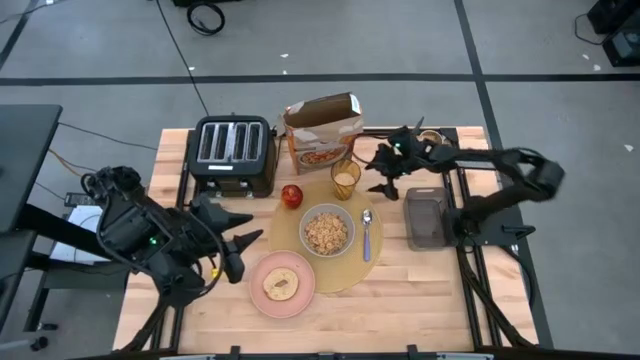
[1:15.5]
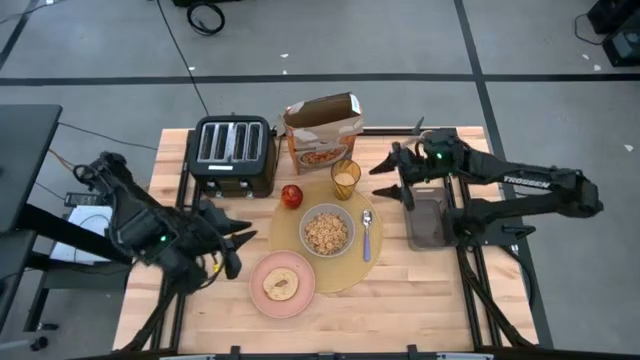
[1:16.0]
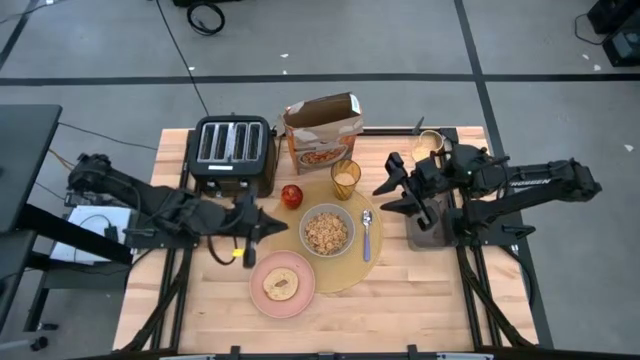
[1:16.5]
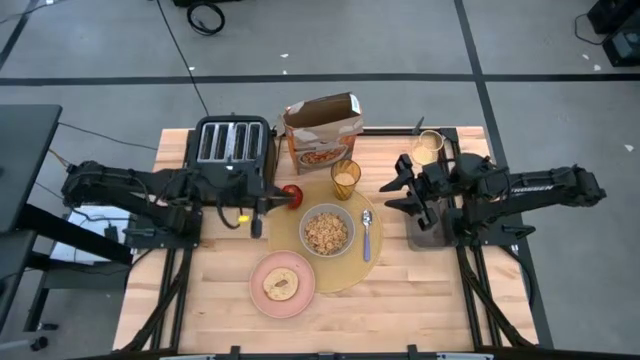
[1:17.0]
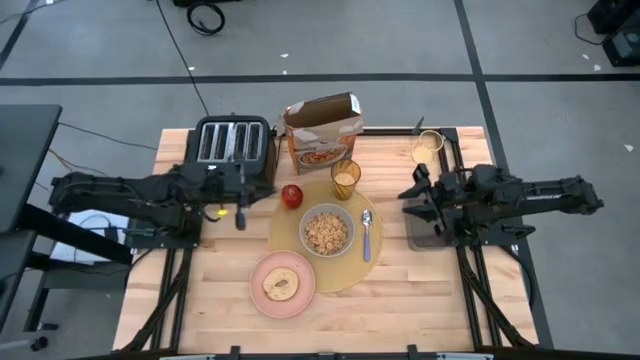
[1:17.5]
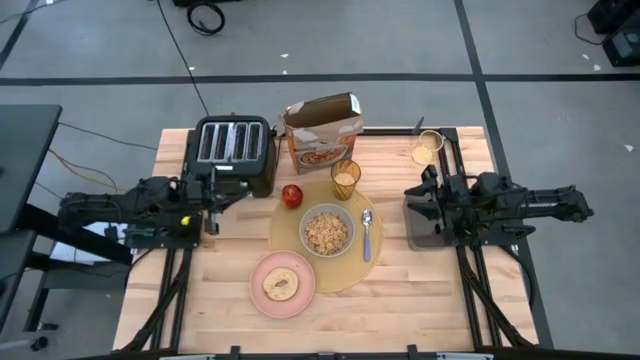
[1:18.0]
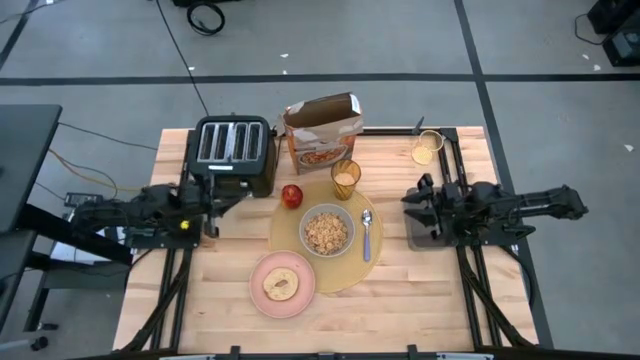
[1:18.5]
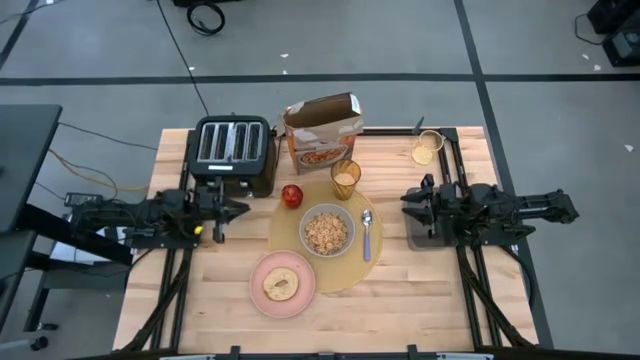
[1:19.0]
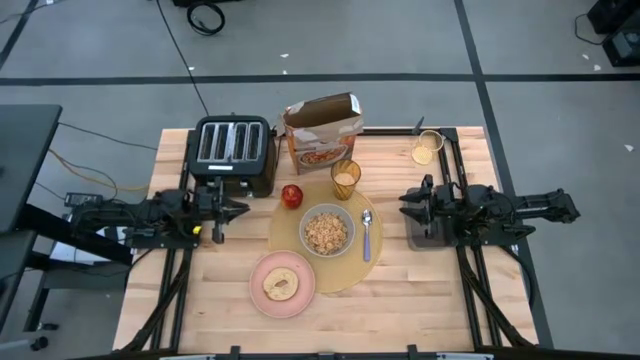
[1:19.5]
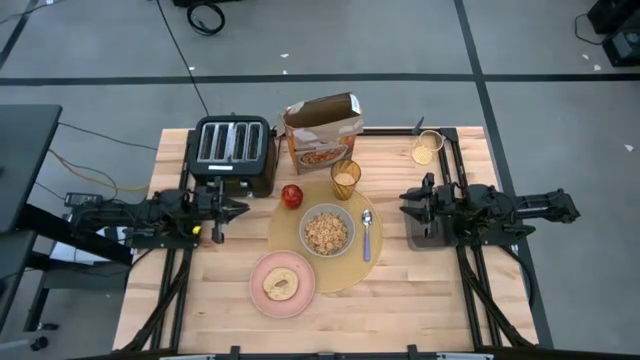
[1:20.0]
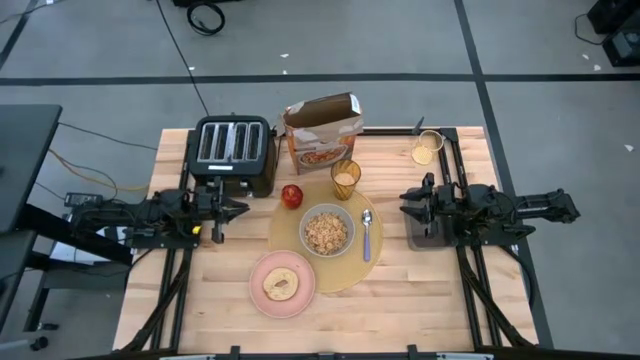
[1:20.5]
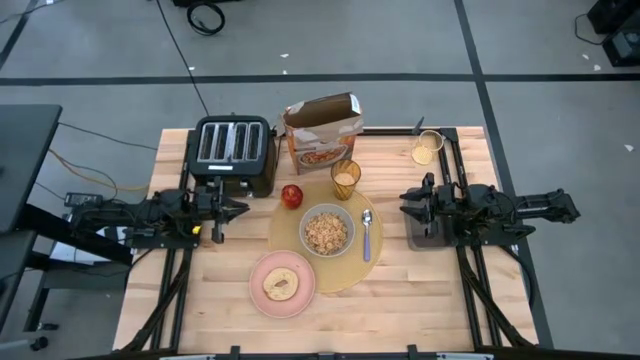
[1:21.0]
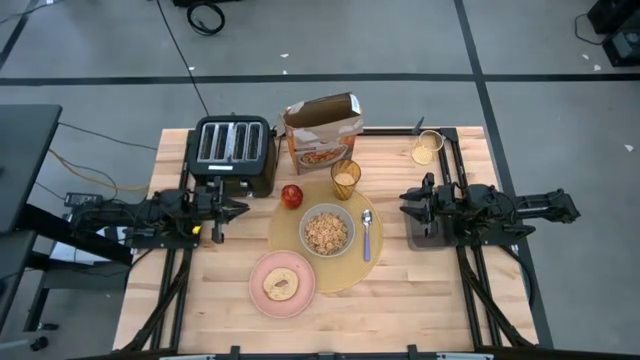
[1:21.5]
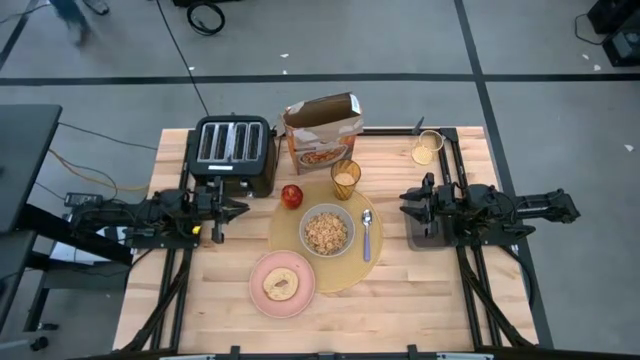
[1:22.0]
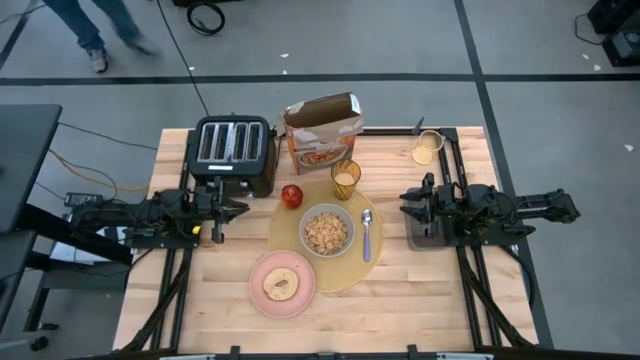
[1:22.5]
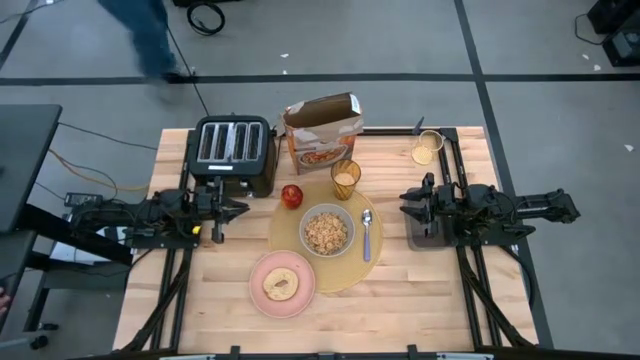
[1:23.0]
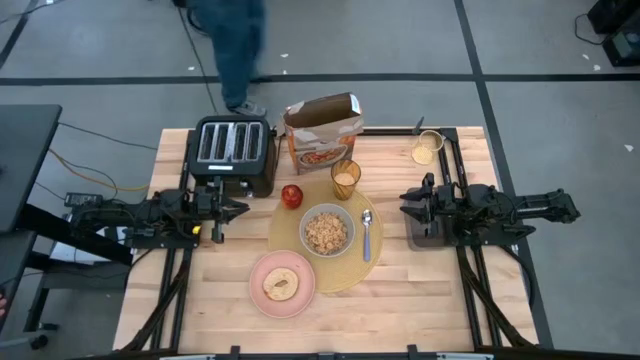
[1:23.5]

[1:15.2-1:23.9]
Task: Arrange a breakfast setting
Return to Home Position

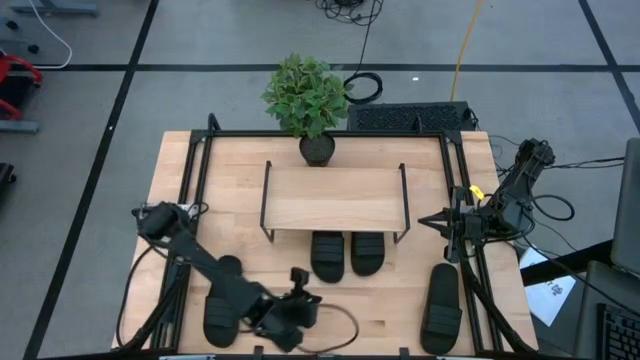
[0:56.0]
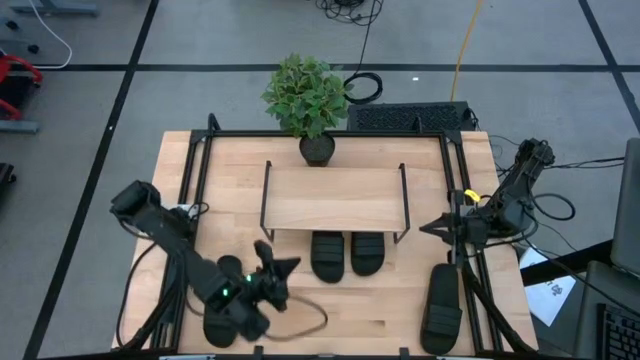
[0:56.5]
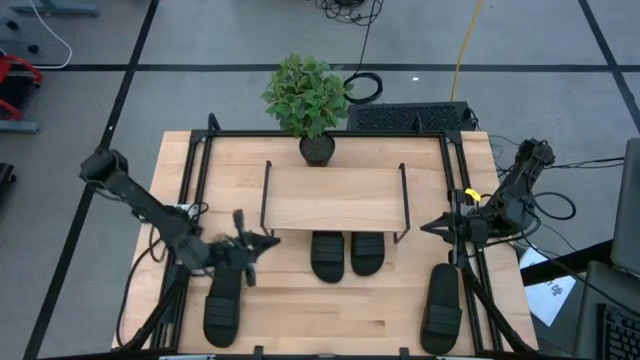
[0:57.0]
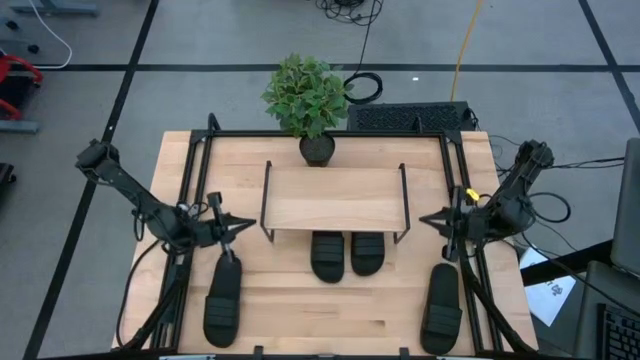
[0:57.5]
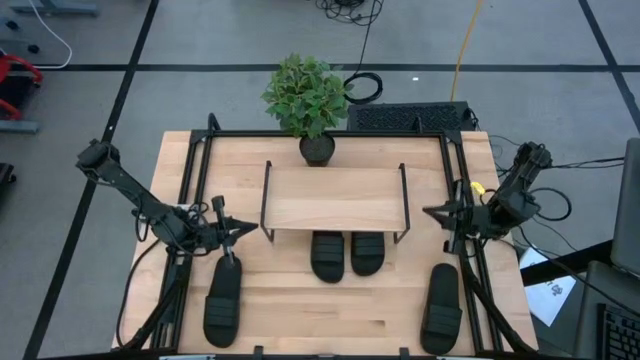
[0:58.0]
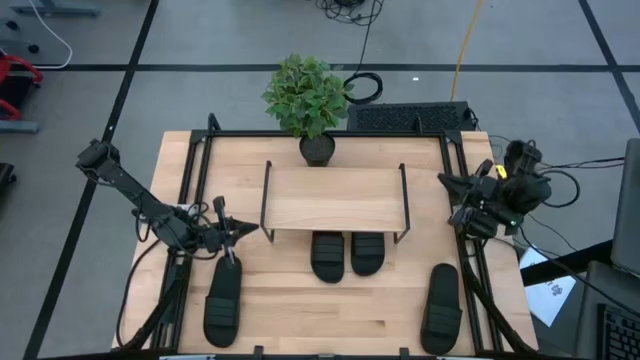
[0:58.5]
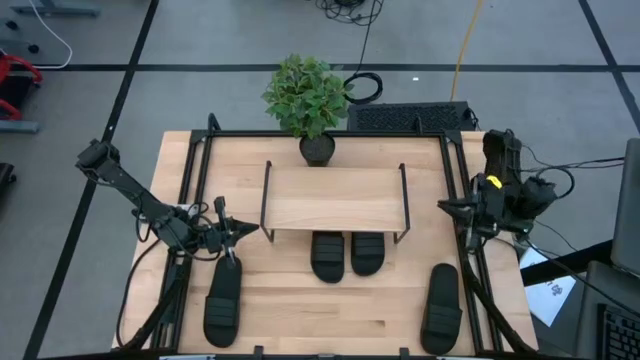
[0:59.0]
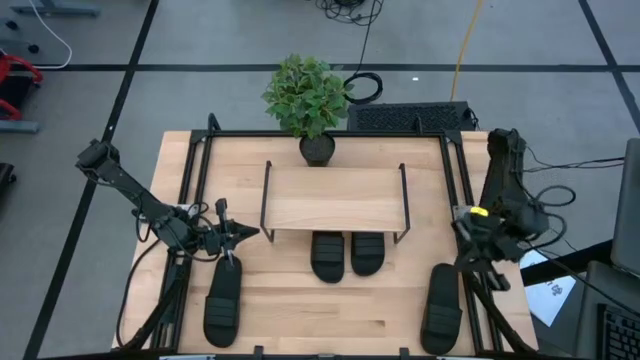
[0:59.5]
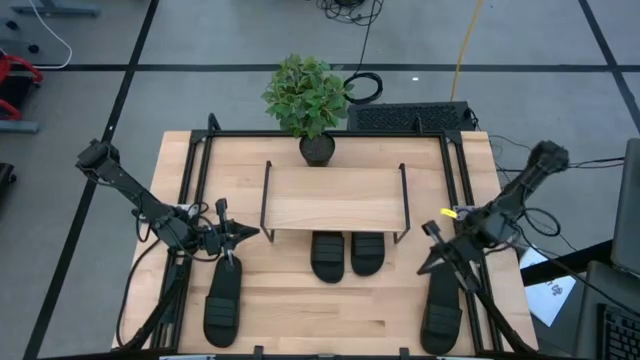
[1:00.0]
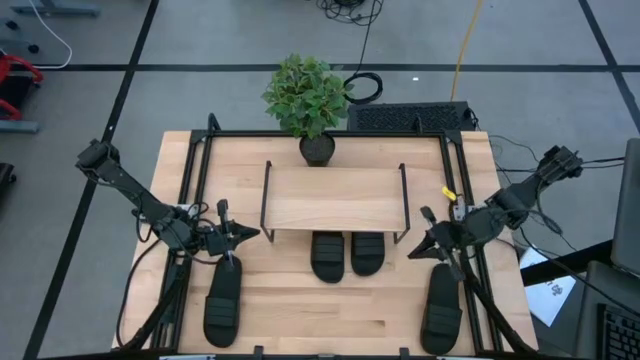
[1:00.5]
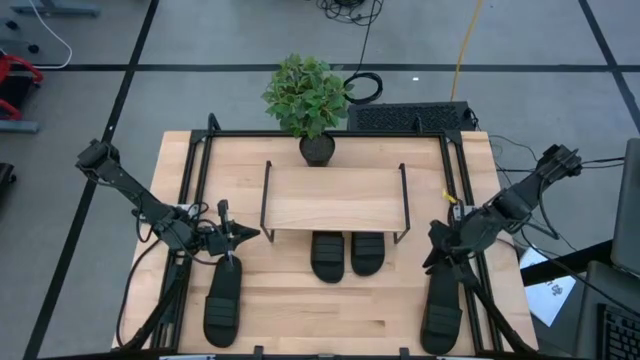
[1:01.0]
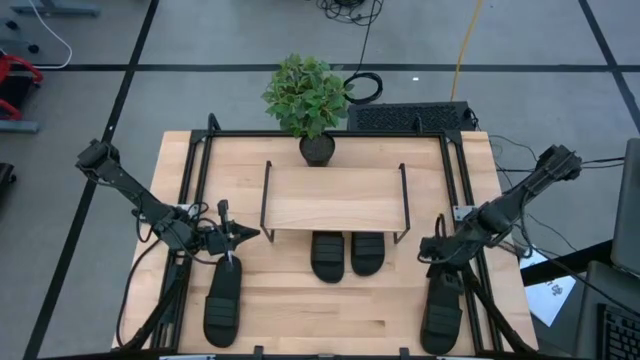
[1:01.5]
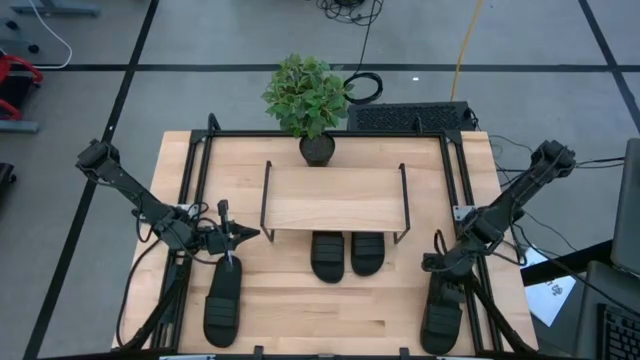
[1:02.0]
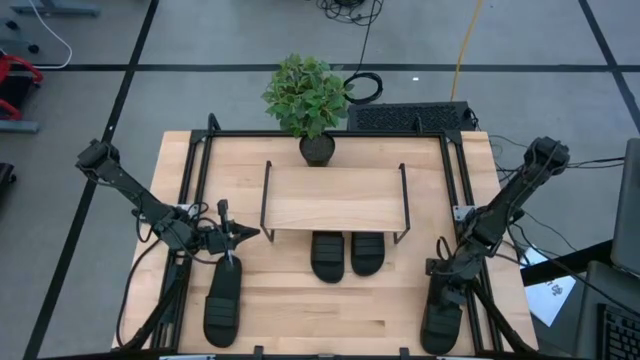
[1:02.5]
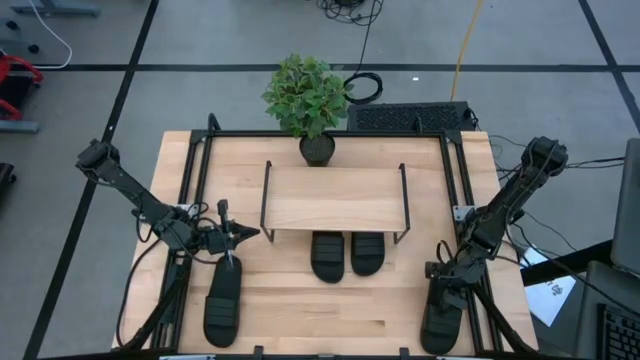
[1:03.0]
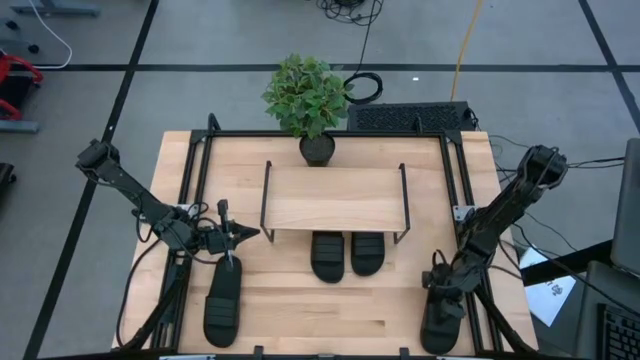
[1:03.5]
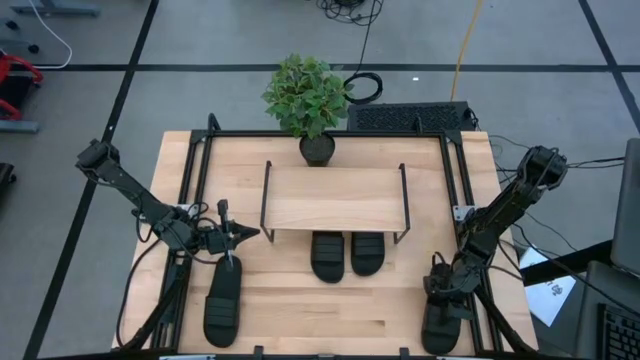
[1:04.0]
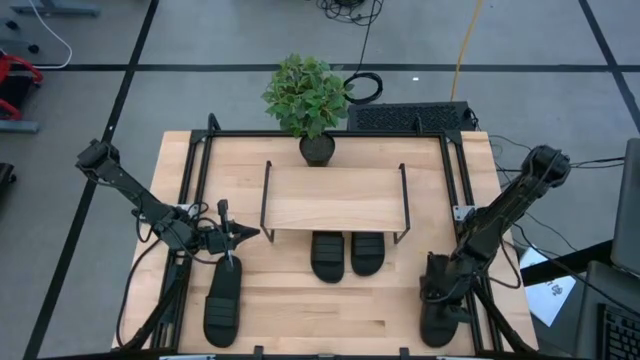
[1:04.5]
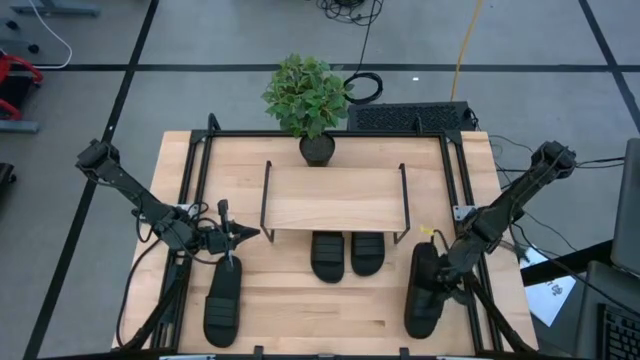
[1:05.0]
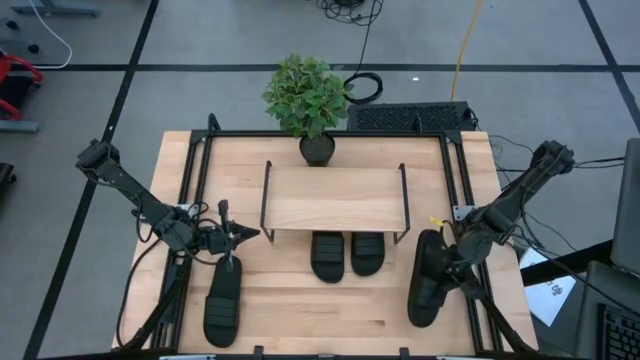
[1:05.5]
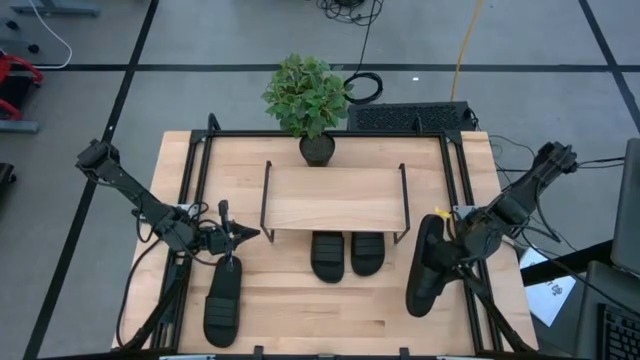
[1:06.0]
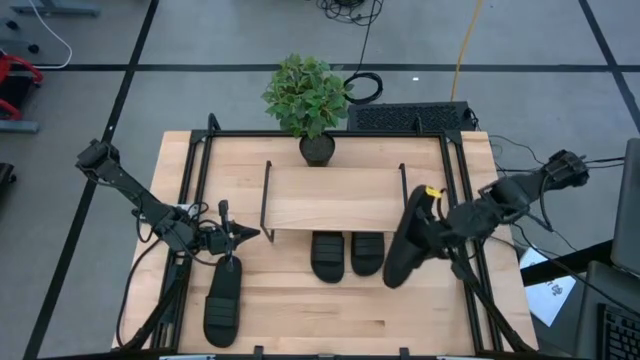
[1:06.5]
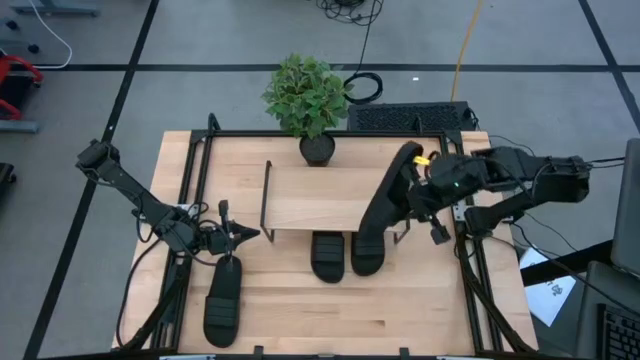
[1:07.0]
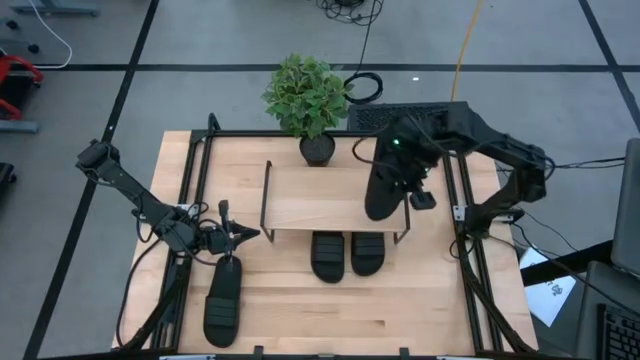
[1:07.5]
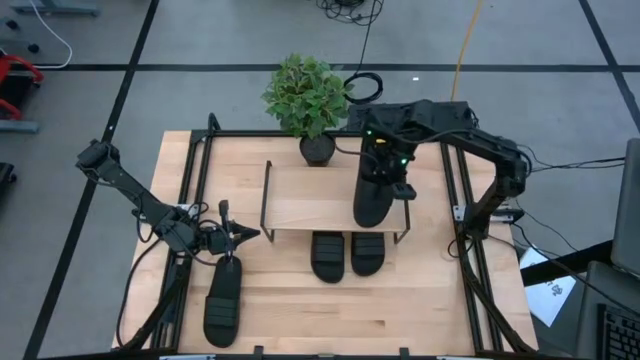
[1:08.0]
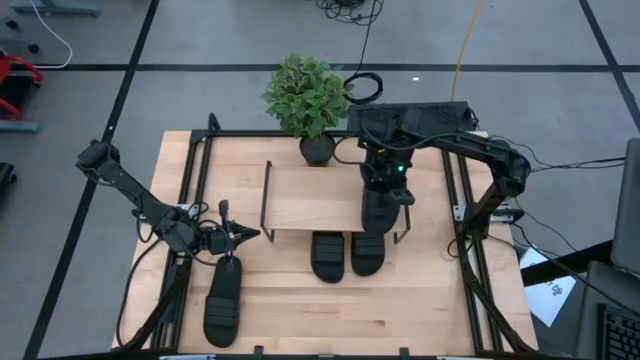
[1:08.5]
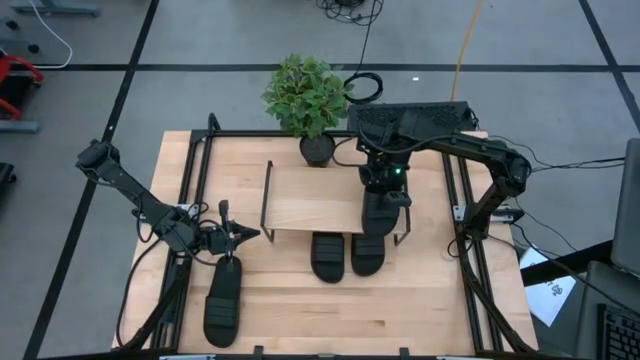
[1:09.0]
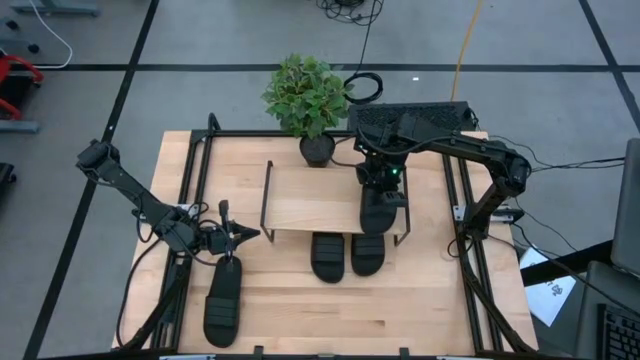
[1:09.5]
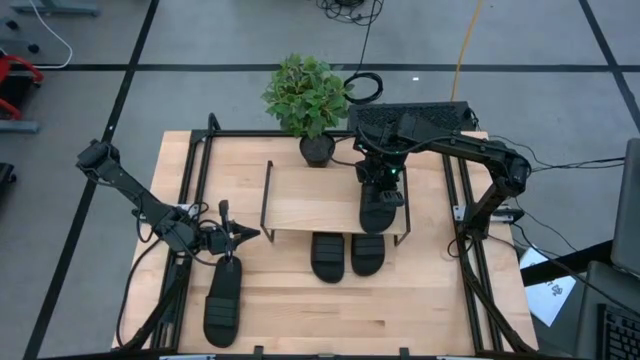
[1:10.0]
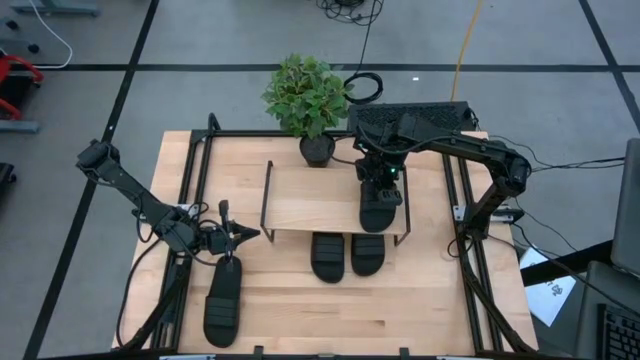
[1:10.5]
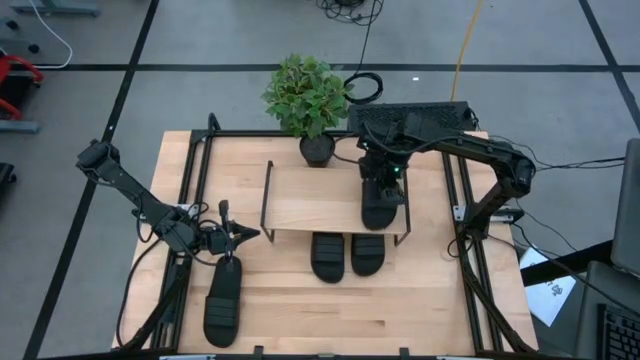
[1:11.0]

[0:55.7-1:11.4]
Task: Pick and place slides into the shelf
Put the black slides on the shelf
